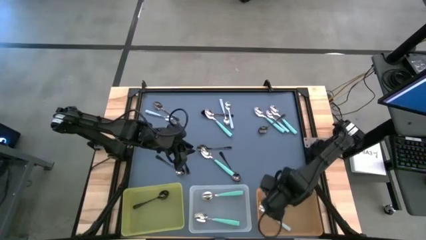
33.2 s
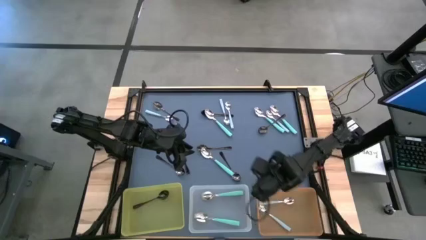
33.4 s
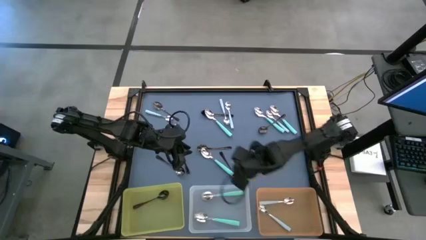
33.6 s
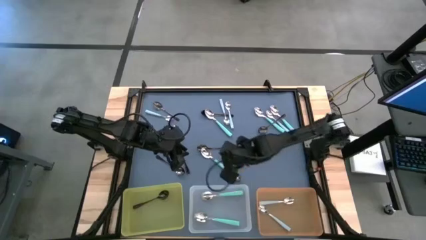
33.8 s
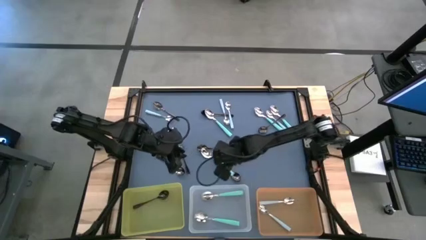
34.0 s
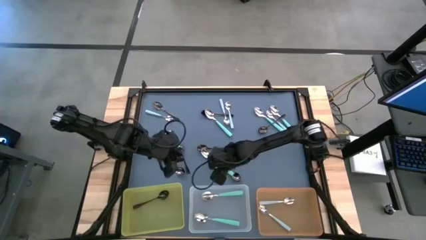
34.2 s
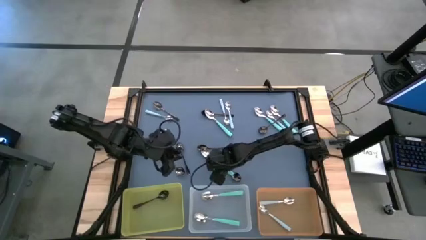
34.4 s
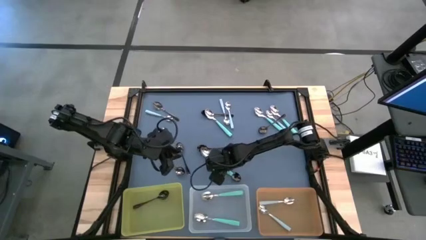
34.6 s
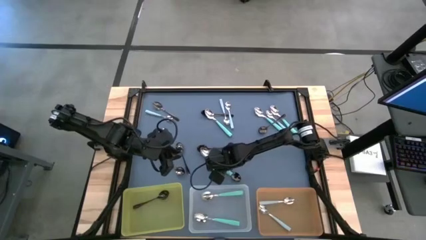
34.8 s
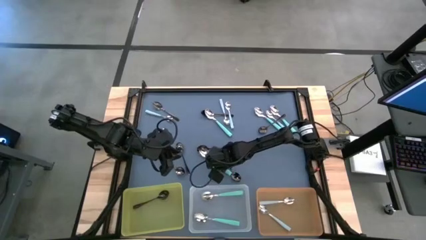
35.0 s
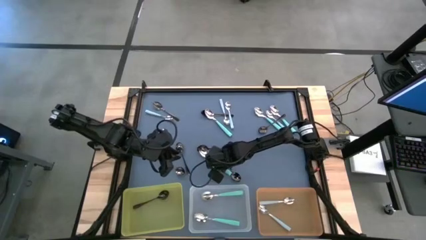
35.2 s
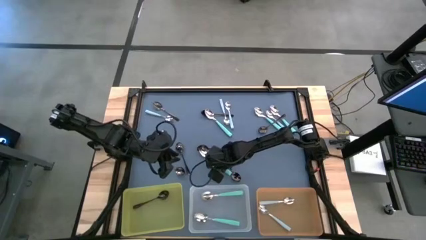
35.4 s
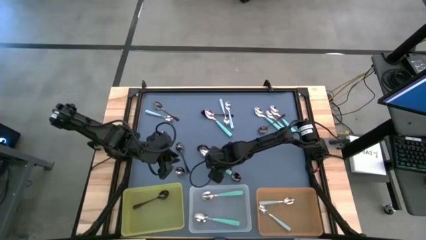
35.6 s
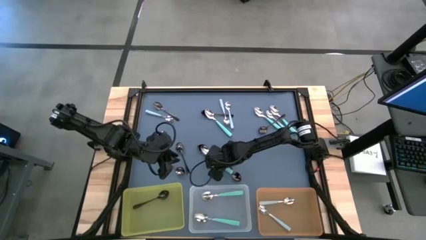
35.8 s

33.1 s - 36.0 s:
Task: Sort silverware by color (type)
Put the green spoon into the transparent bin

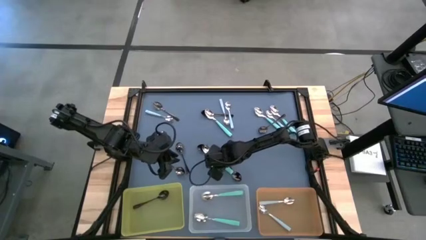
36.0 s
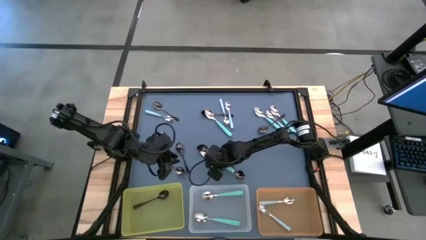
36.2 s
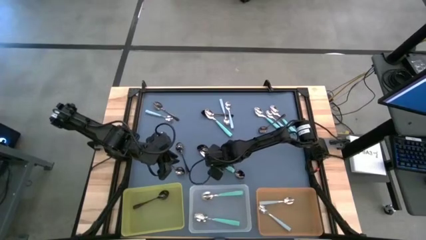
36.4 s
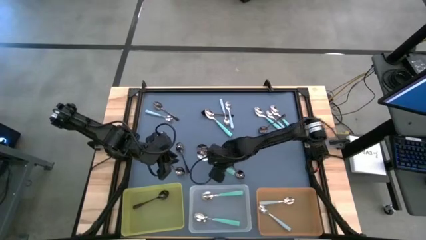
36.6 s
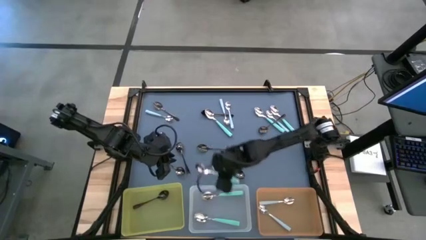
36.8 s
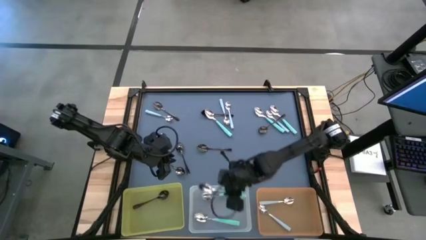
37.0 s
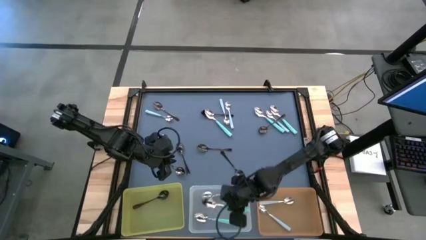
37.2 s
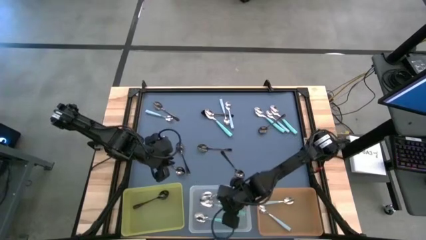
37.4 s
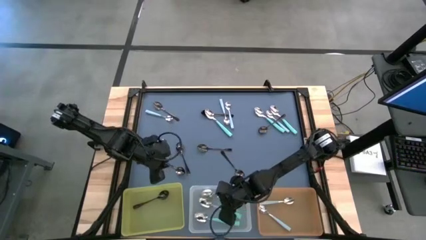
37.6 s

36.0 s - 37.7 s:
Put the green spoon into the transparent bin

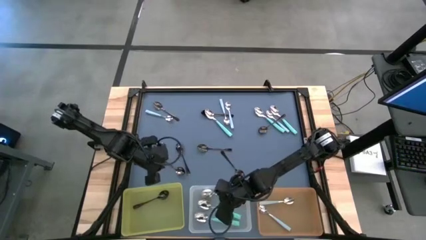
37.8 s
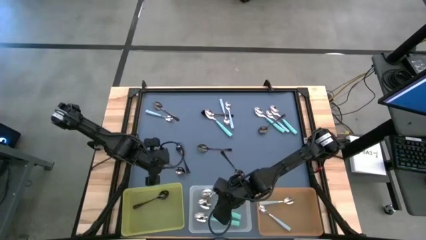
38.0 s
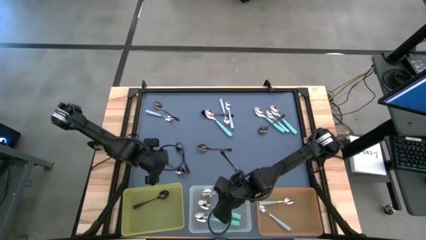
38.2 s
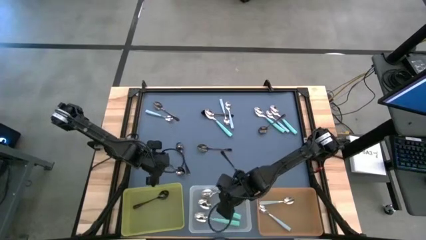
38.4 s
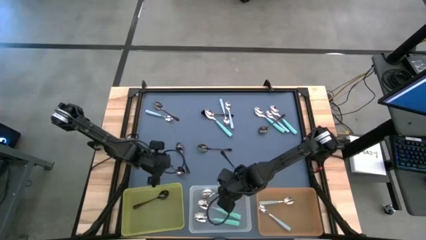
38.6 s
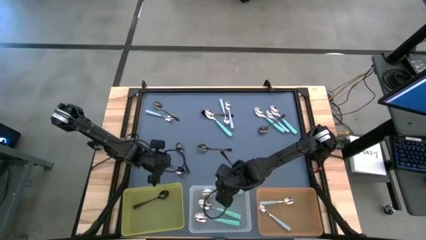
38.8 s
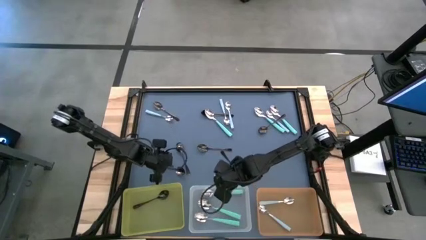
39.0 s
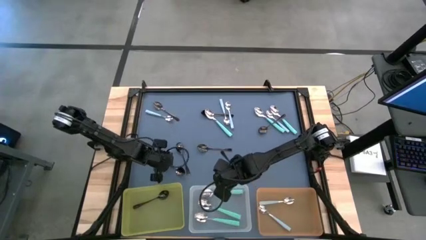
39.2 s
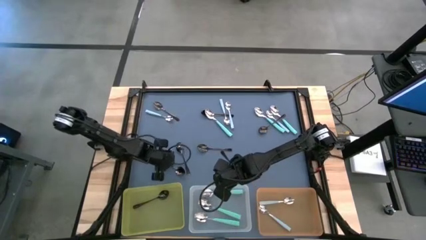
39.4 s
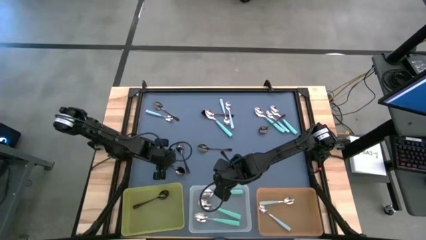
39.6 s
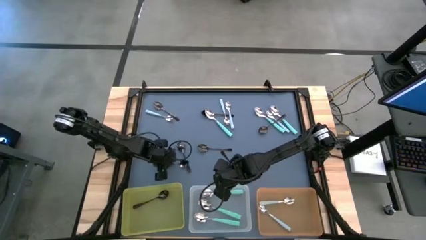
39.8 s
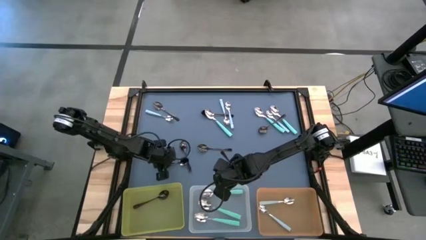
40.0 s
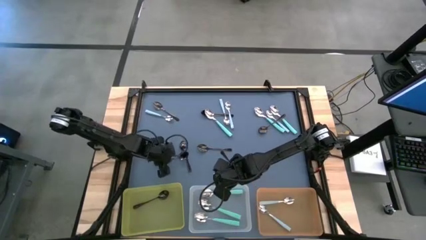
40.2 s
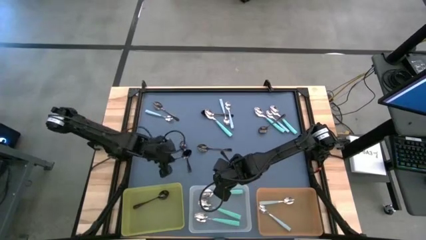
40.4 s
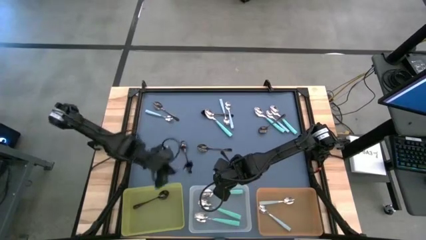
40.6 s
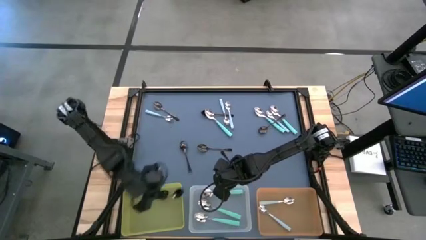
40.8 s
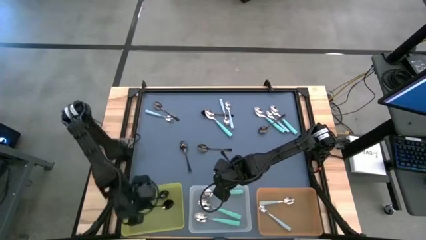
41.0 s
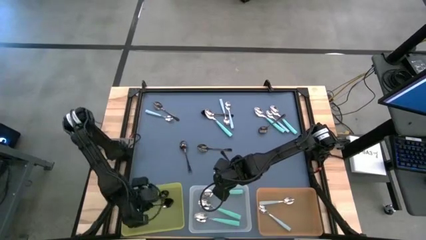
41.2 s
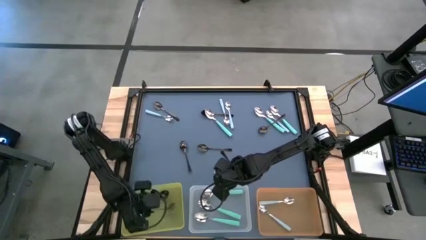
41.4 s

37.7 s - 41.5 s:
Put the black spoon into the yellow bin

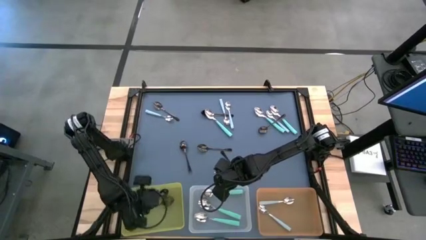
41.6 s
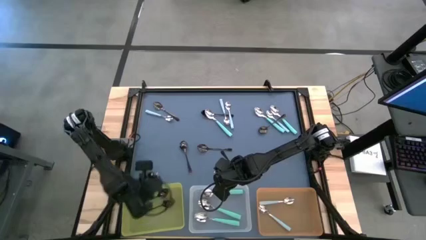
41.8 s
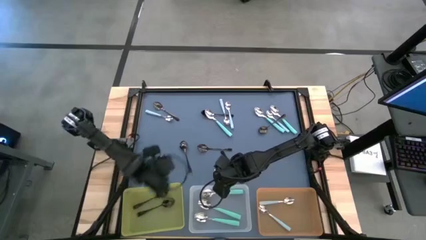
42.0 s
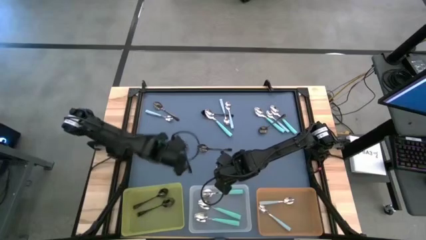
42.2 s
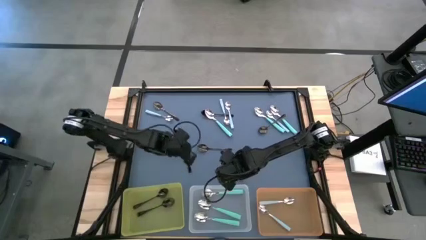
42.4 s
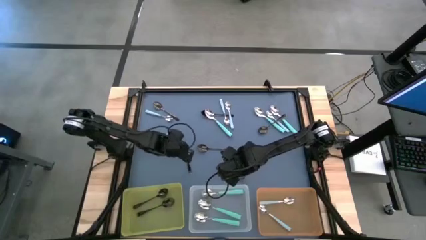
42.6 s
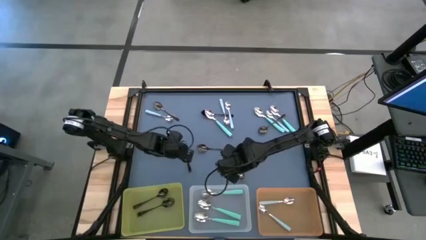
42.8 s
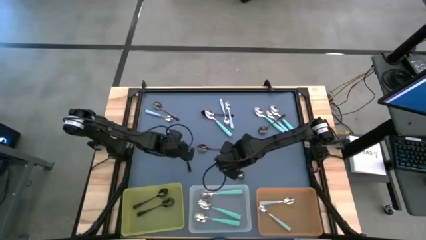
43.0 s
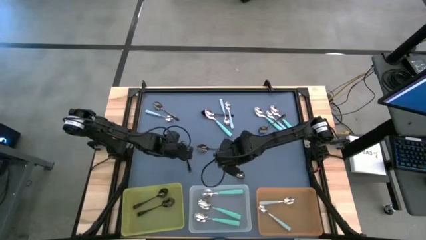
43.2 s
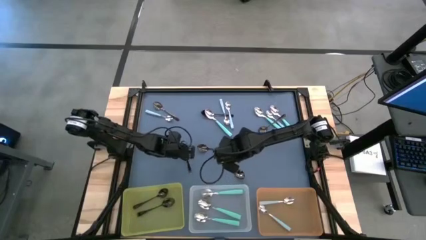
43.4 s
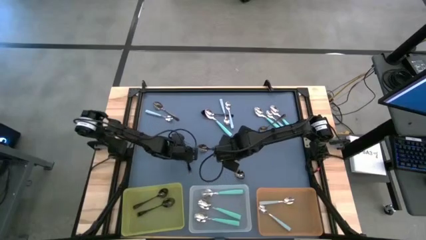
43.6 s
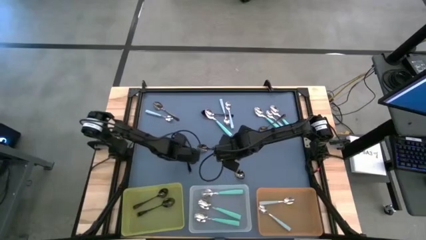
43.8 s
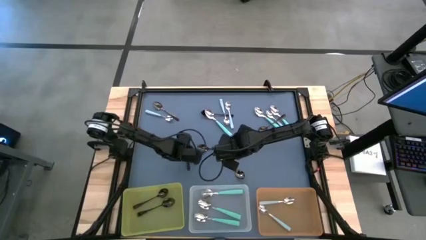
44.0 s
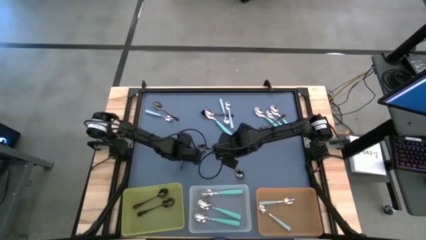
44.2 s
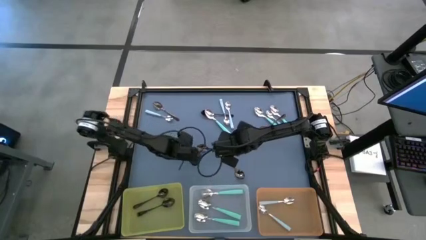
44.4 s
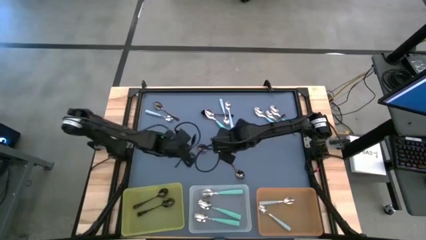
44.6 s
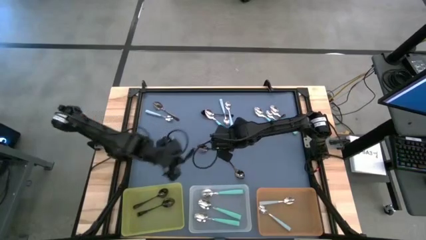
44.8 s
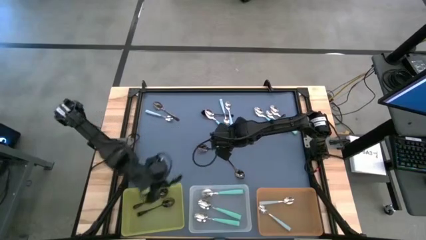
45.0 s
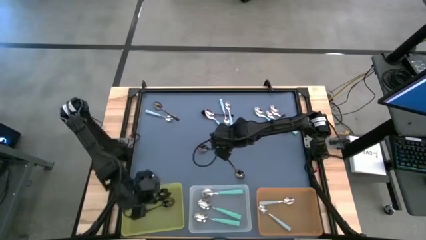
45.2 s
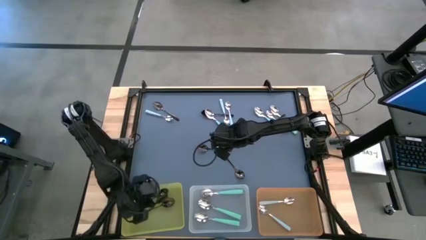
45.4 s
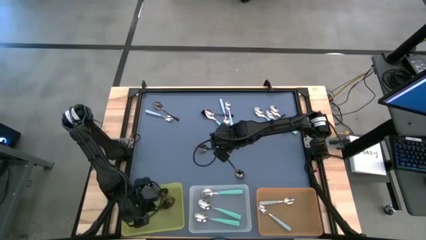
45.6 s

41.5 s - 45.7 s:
Put the black spoon into the yellow bin

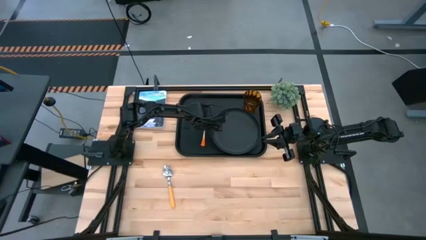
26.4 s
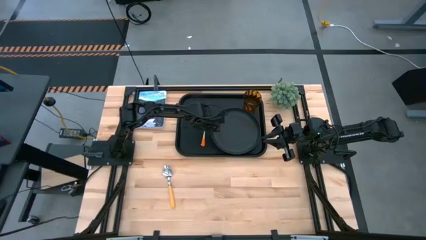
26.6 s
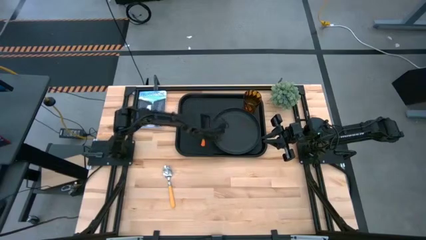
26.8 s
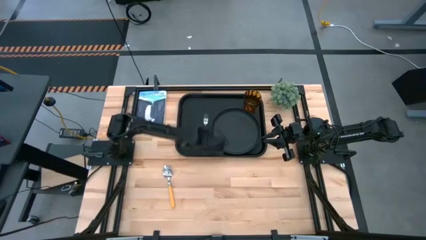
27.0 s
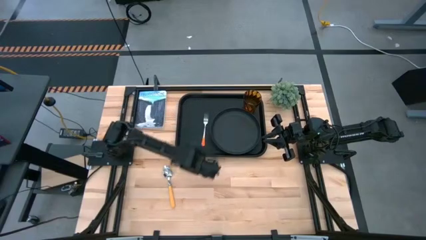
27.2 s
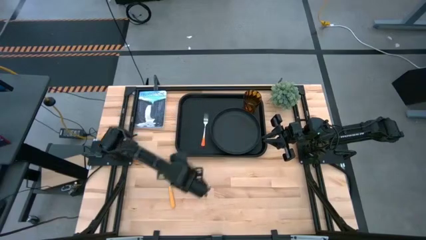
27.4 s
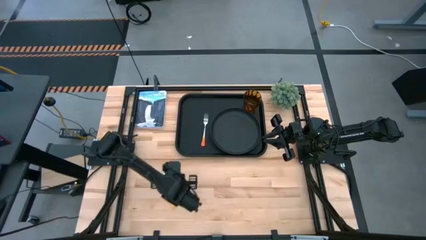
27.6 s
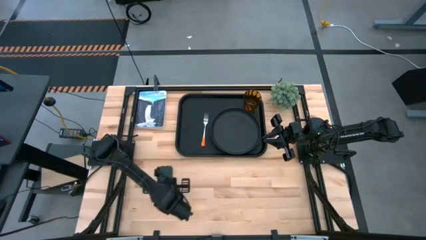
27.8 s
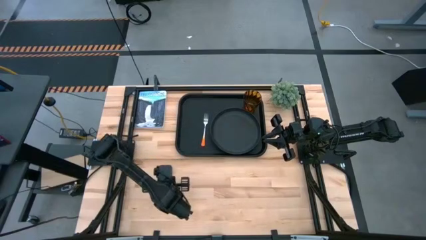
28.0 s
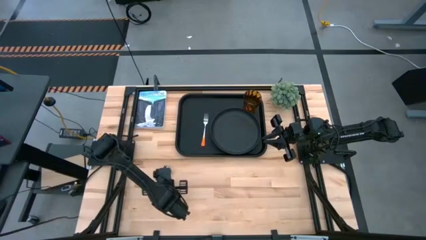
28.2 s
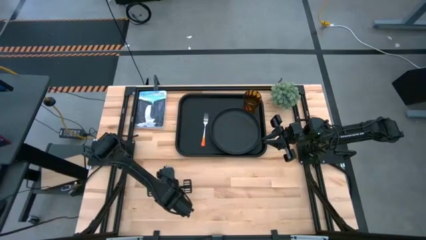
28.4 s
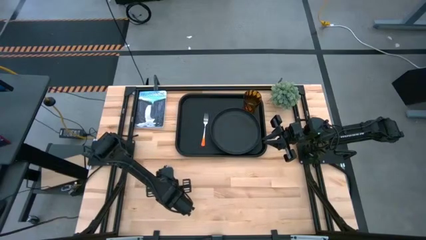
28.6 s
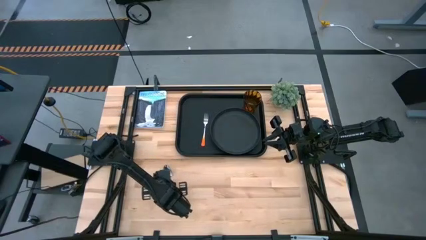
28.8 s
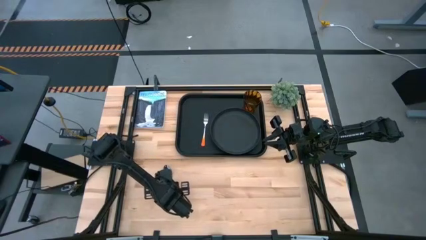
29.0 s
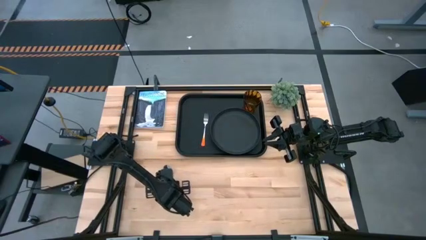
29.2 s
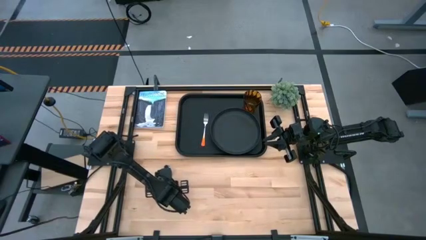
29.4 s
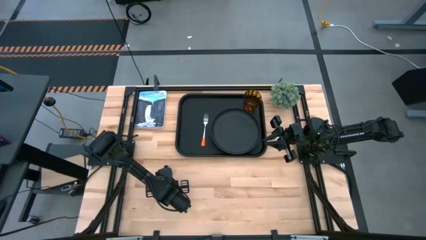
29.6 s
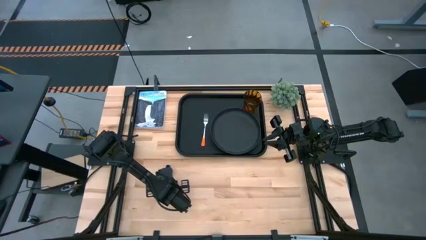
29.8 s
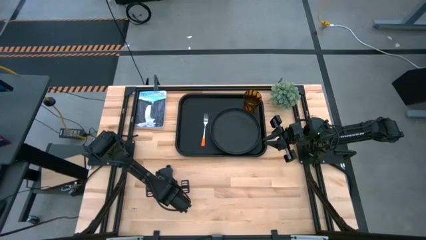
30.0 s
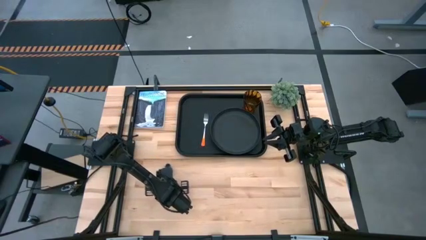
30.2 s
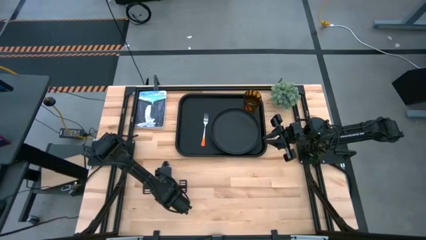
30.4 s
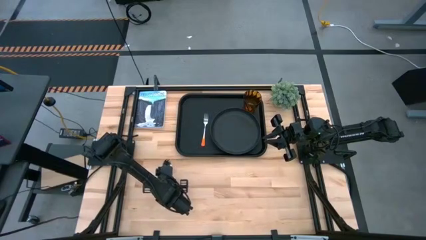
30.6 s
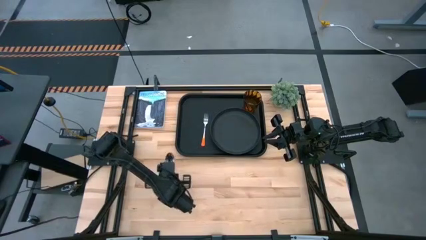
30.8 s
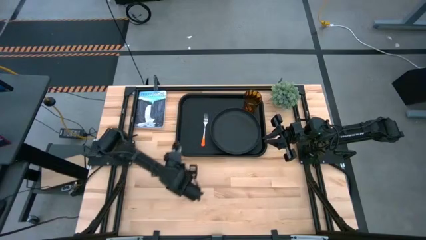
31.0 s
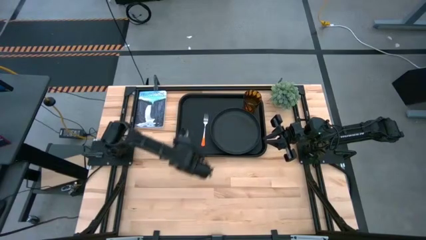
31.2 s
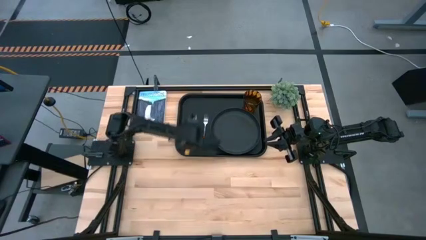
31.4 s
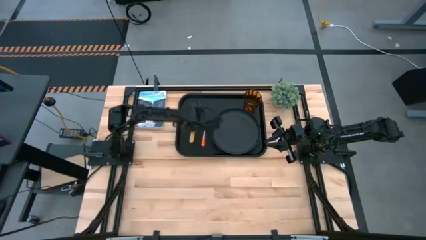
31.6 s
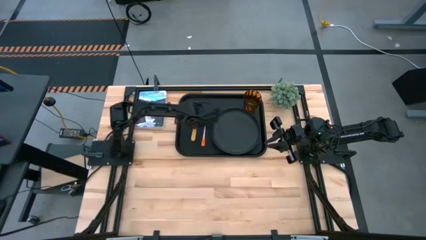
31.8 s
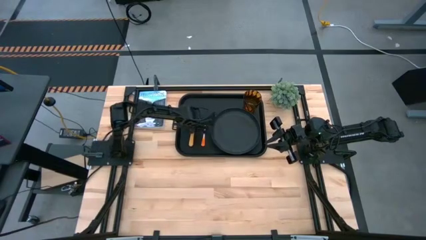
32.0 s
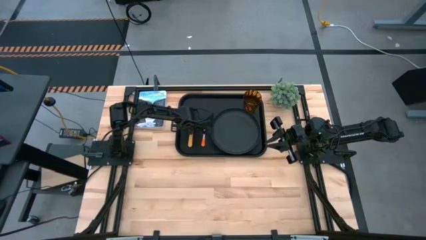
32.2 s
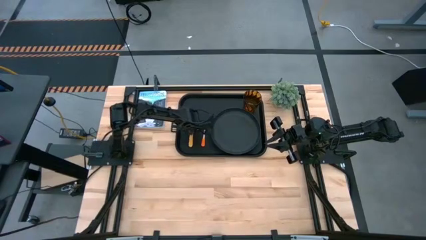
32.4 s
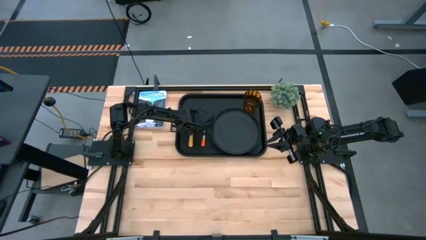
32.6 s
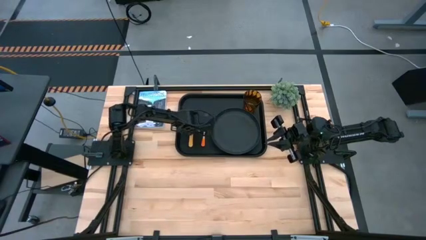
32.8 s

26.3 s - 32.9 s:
Task: Pick and place plate/cup/fork/spoon on tray
Put the yellow spoon on the black serving tray to the left of the orange fork
